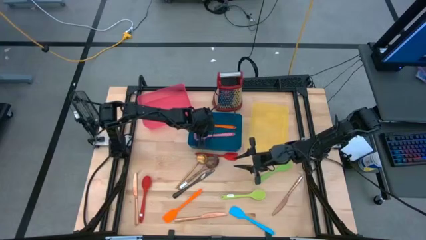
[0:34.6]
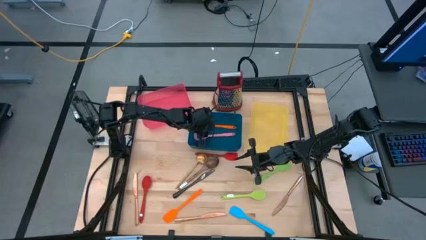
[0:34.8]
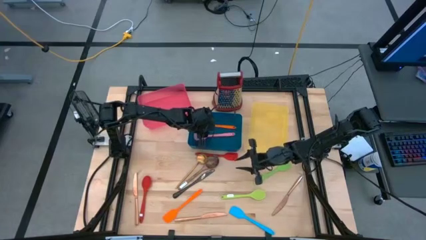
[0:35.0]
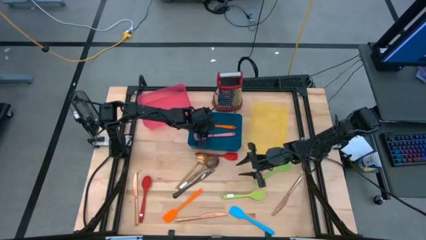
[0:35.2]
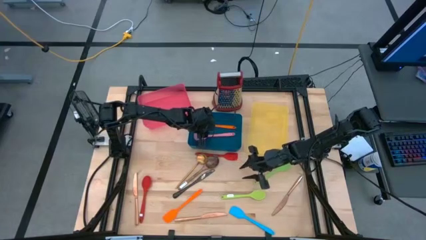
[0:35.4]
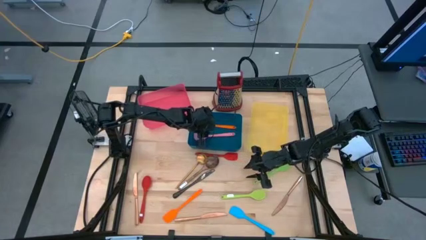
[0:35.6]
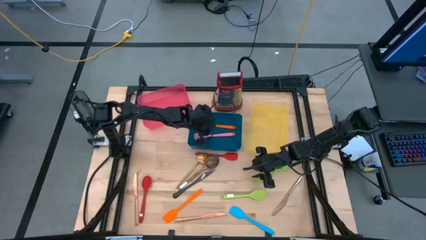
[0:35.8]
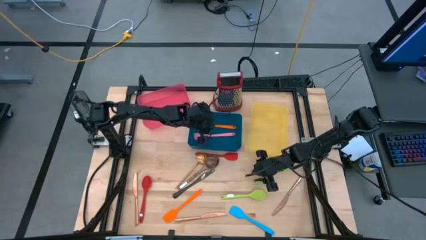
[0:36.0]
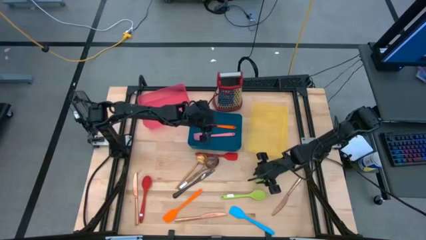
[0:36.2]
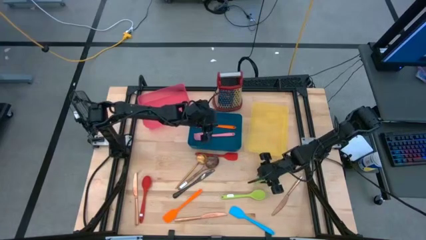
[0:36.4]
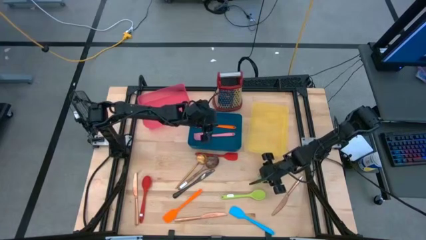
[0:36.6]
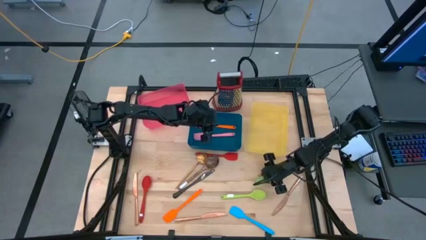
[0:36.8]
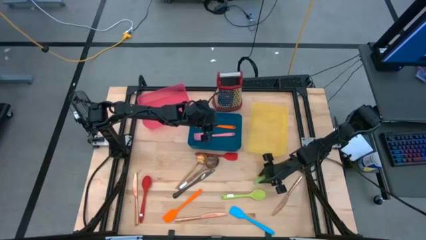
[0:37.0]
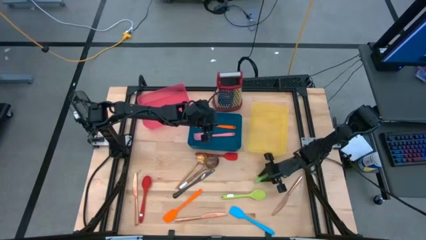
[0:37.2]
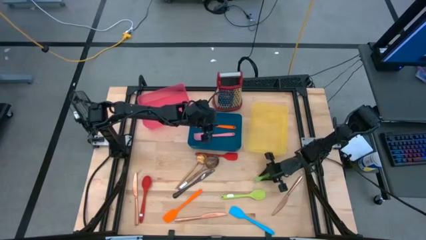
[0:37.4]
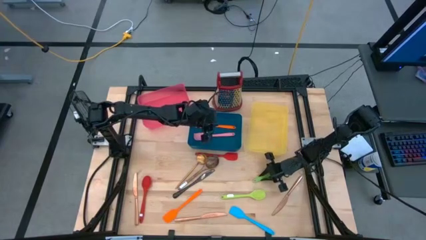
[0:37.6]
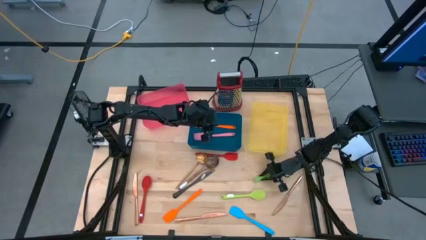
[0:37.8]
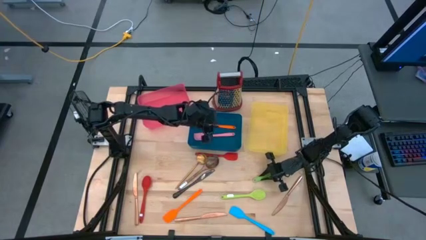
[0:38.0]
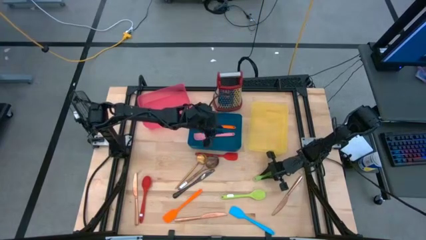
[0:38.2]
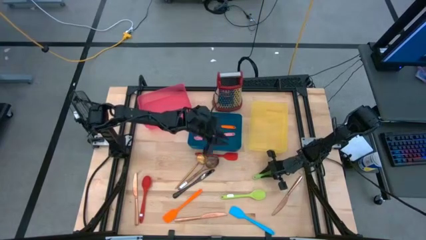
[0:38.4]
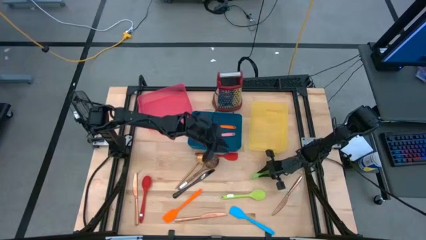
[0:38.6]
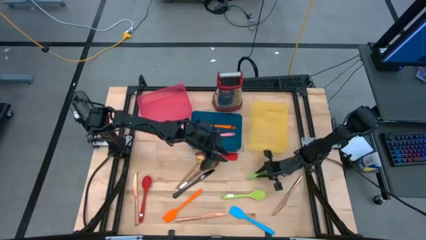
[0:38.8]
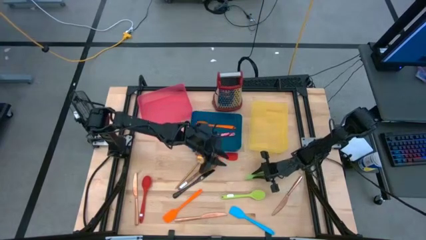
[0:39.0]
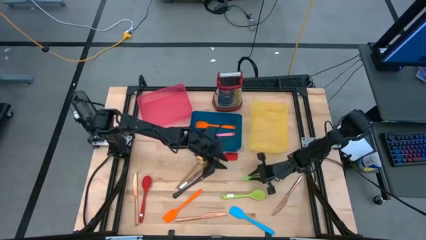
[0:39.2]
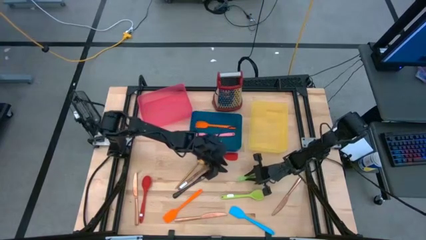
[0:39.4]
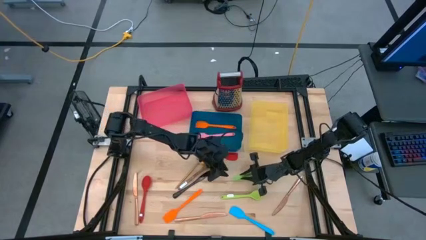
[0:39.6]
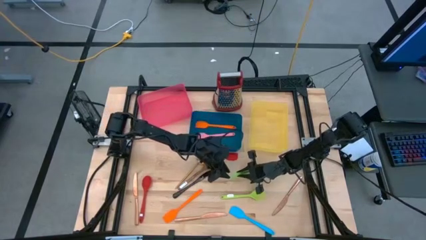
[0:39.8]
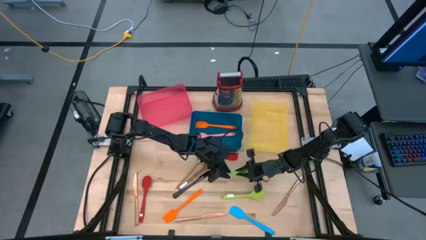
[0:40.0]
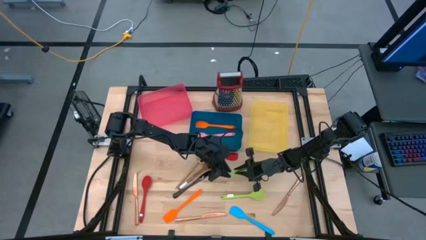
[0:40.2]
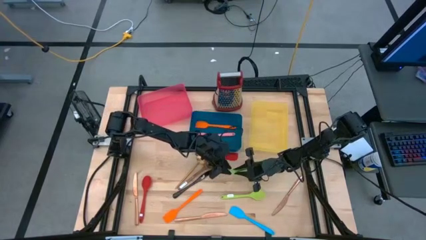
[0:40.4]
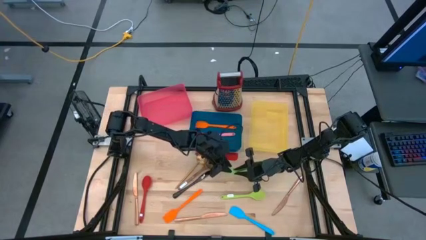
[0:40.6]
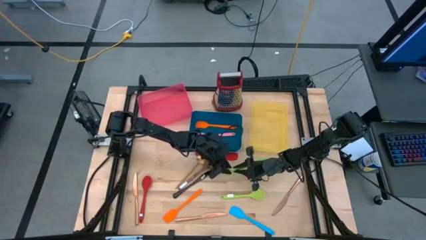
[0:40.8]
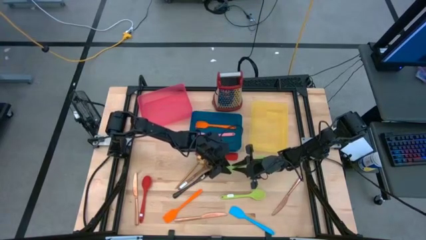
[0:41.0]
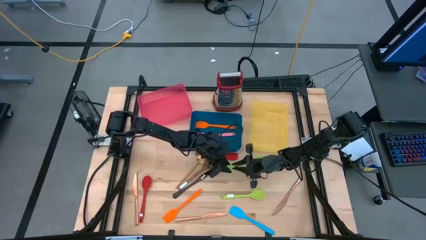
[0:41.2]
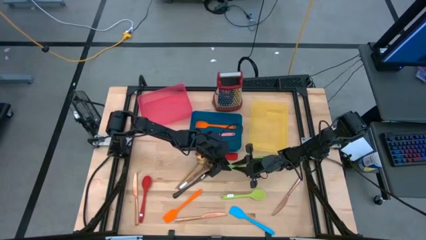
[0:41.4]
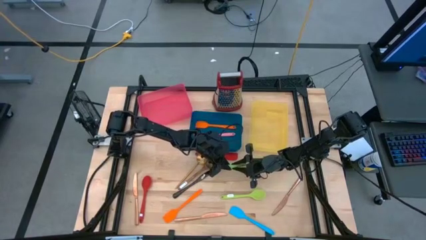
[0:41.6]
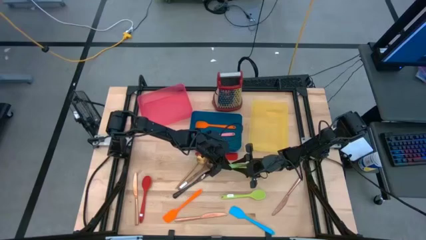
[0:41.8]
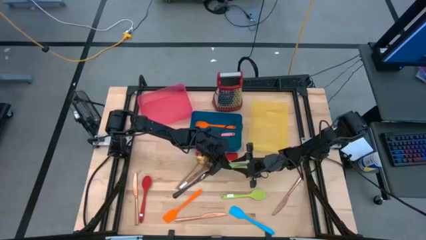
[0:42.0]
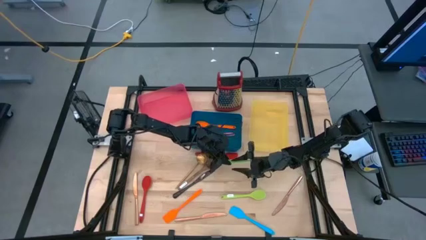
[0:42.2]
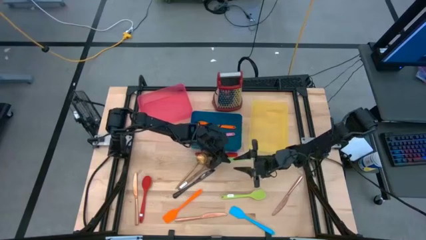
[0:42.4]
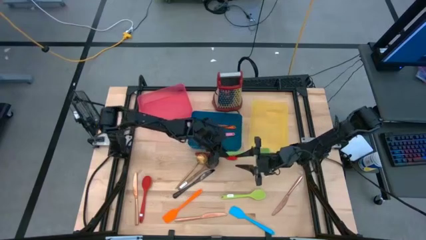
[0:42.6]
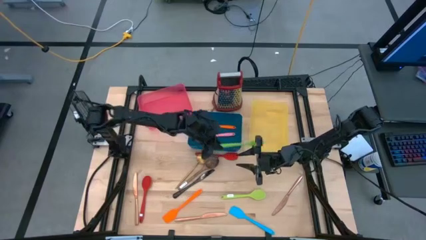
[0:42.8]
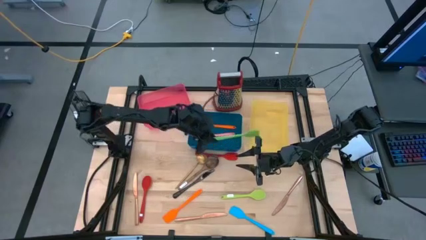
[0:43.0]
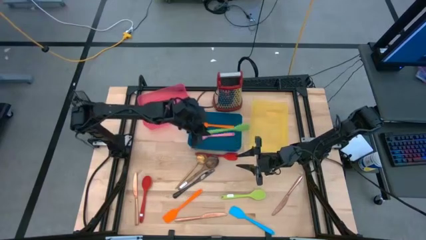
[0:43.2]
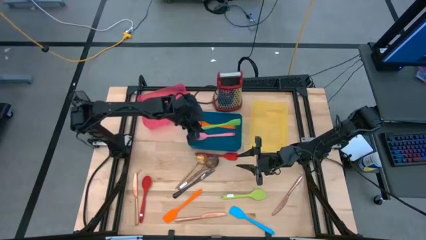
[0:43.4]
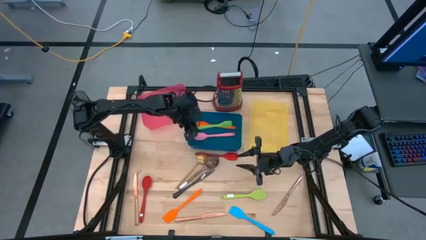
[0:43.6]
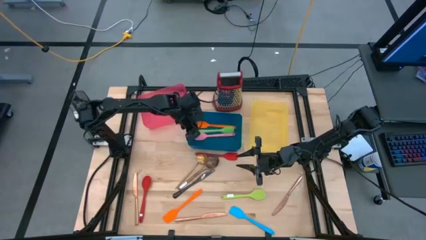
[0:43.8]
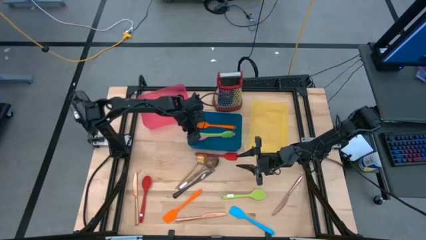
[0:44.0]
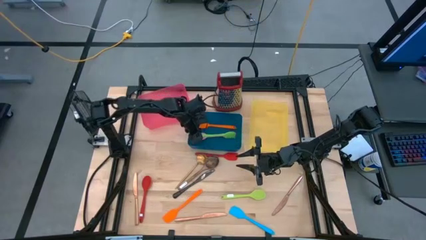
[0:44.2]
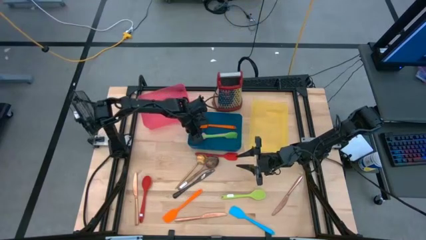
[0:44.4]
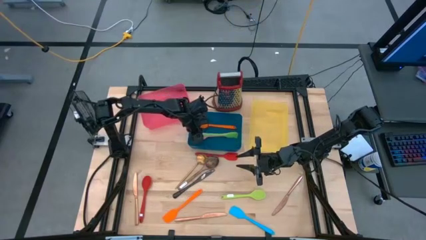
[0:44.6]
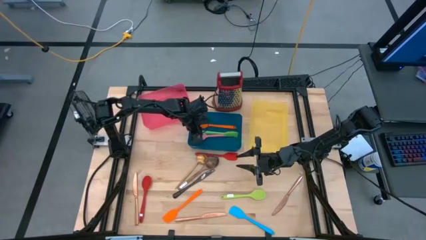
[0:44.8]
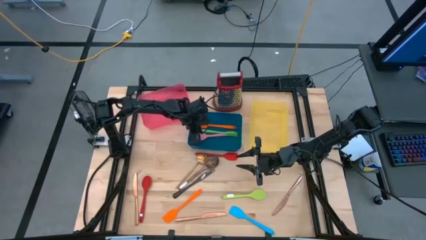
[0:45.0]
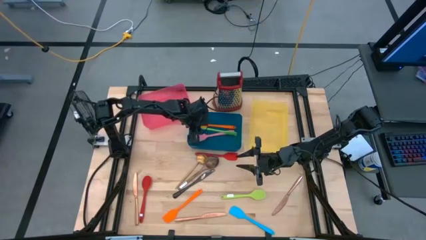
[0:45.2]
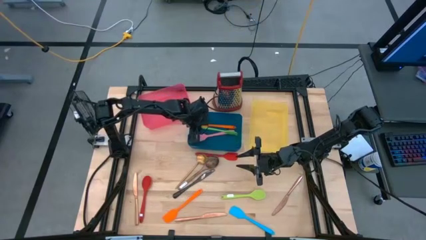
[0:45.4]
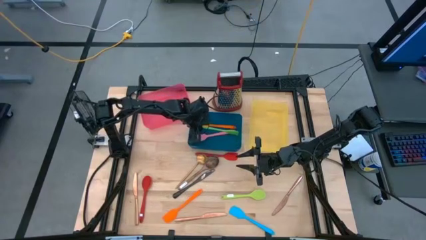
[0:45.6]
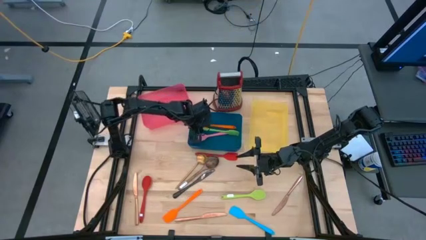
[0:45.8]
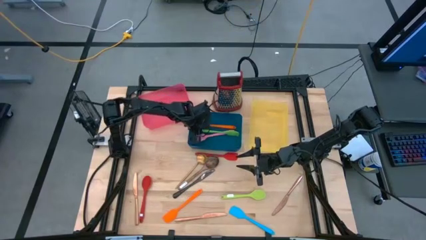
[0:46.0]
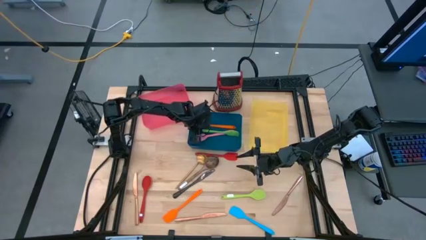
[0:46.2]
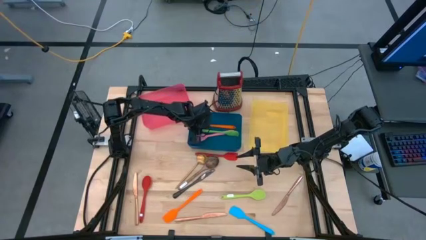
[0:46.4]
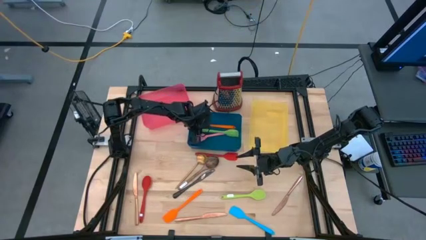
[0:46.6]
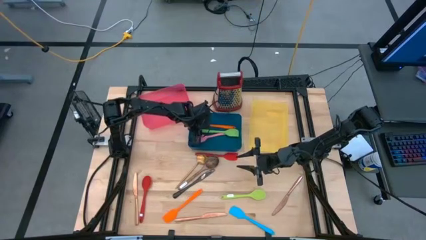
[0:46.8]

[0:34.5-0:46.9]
Task: Pick & Place Kitchen Items
Put the green spatula into the blue bin

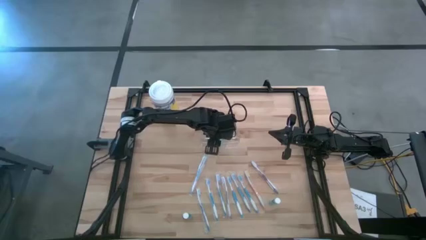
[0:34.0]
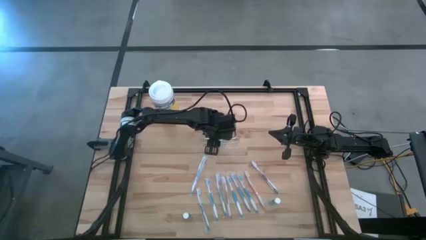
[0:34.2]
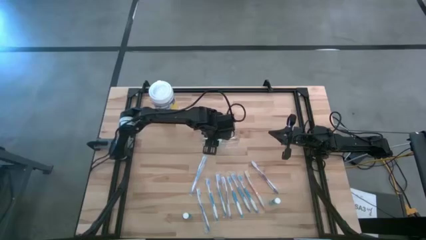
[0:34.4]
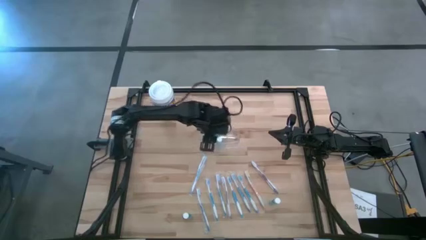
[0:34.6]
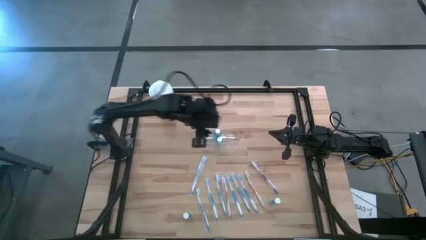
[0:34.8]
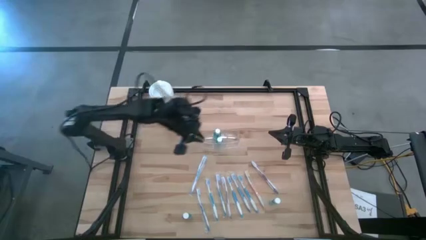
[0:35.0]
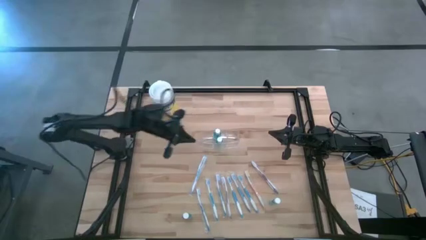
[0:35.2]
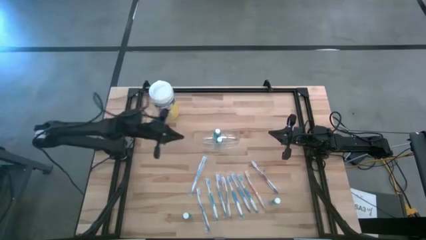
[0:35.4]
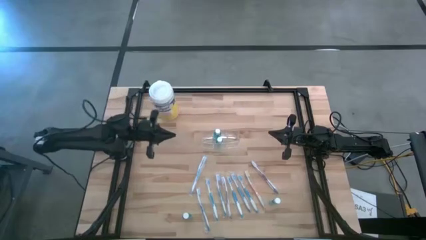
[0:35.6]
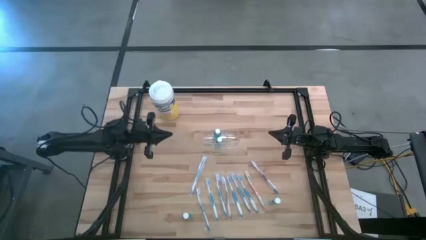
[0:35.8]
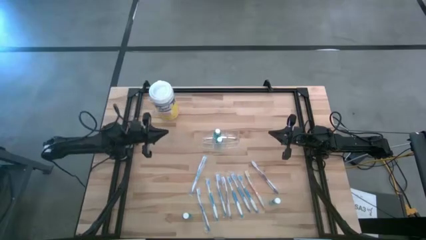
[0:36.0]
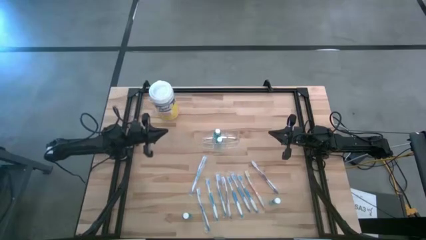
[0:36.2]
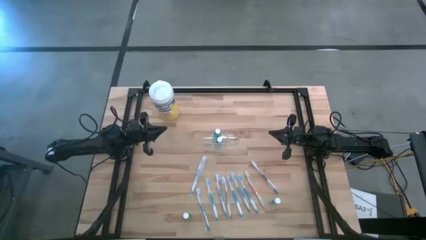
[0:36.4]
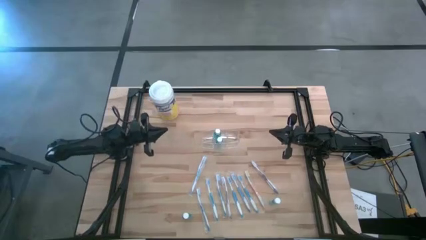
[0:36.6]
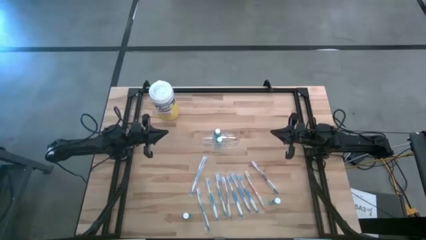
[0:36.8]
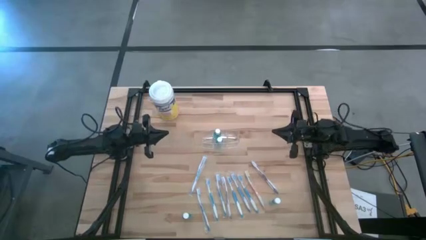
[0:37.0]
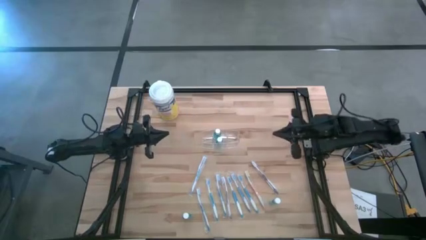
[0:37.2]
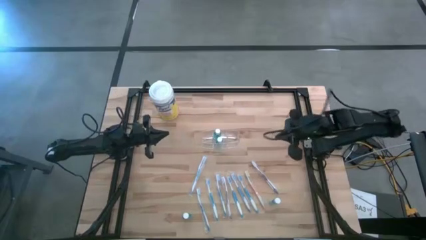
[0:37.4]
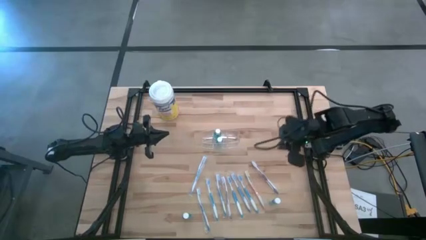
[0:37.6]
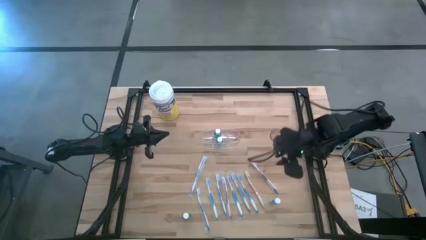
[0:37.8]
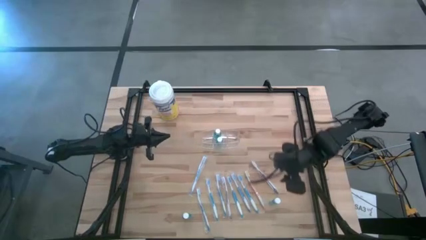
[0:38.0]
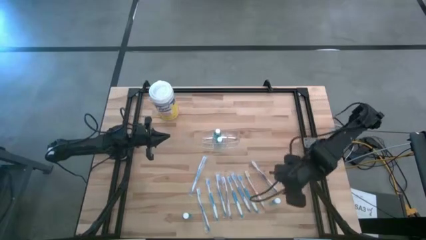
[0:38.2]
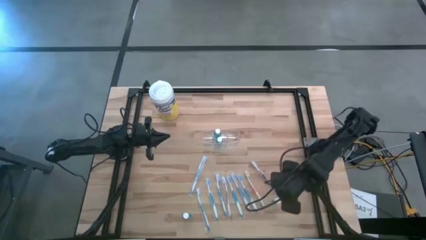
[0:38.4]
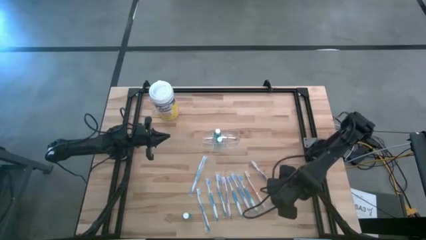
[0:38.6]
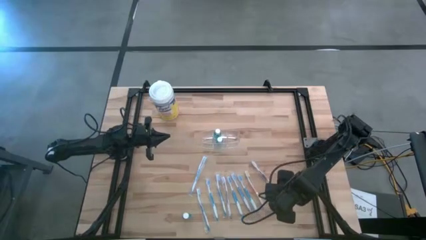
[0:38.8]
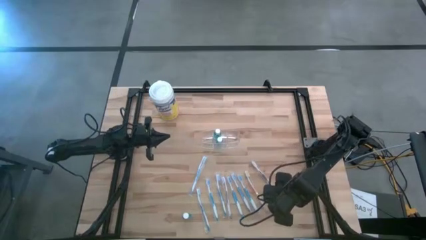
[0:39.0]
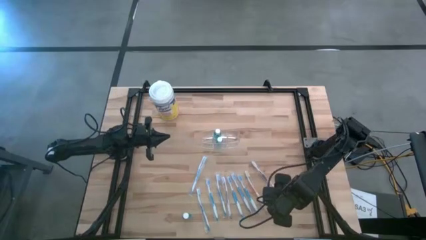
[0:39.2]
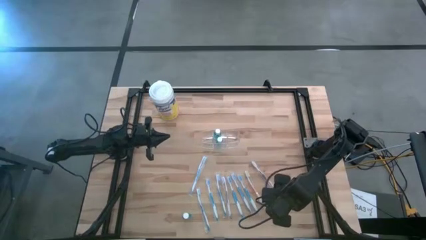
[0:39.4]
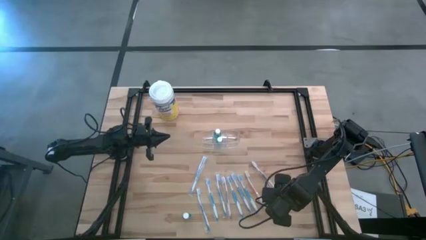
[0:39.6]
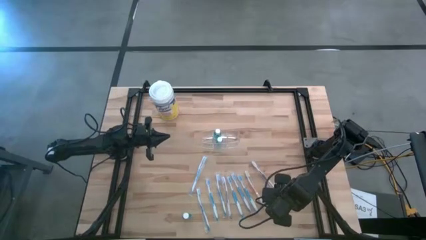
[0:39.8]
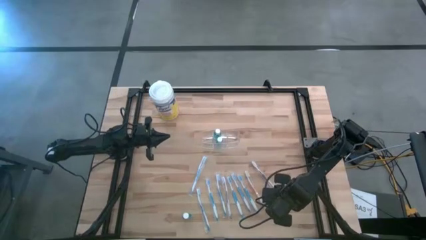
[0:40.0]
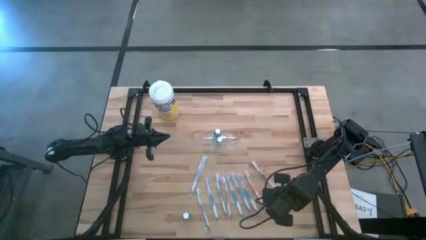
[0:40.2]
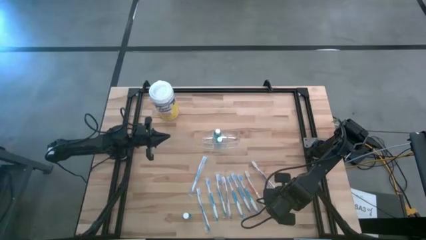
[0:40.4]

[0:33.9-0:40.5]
Task: Pick & Place toothbrushing station
Put the blue mouthwash bottle into the middle section of the transparent organizer
